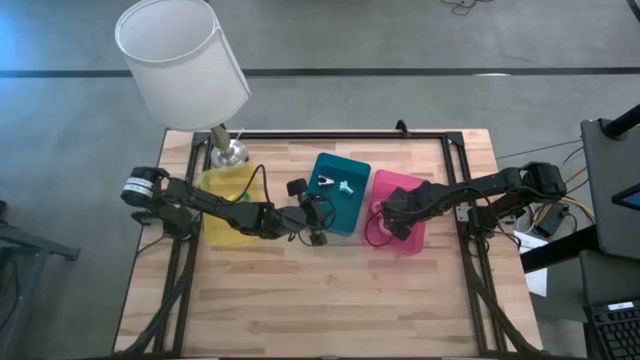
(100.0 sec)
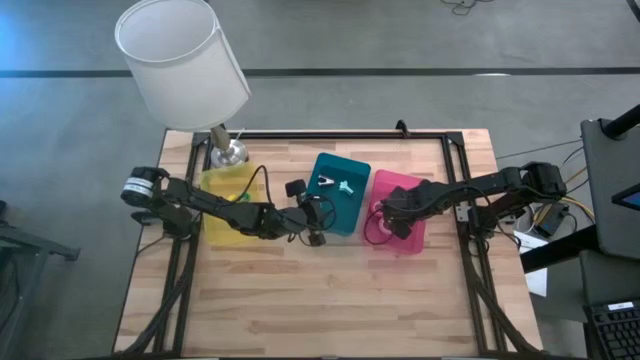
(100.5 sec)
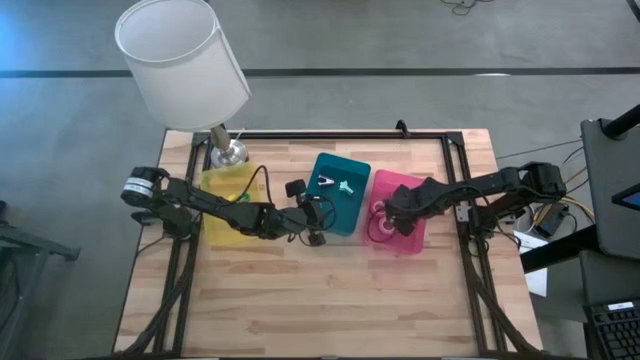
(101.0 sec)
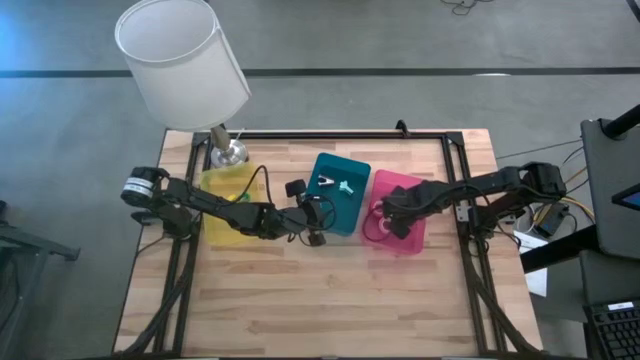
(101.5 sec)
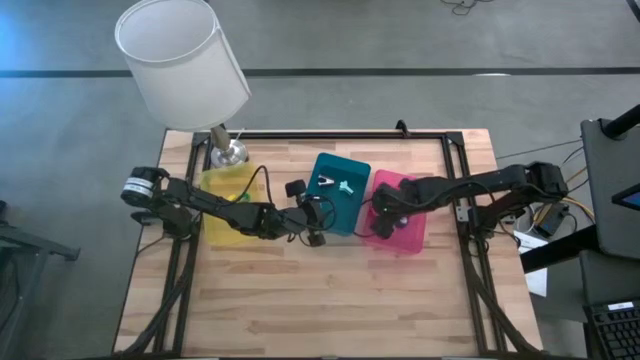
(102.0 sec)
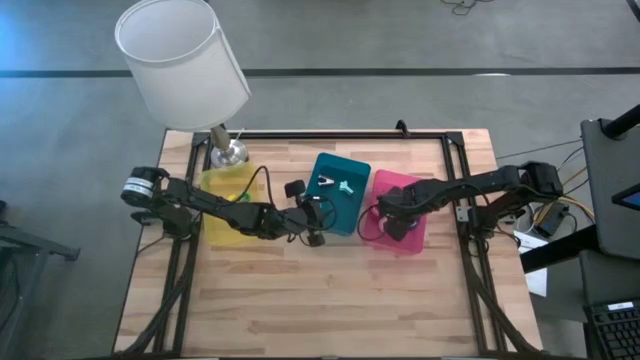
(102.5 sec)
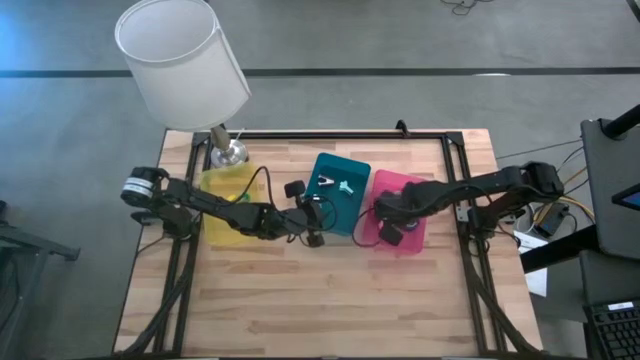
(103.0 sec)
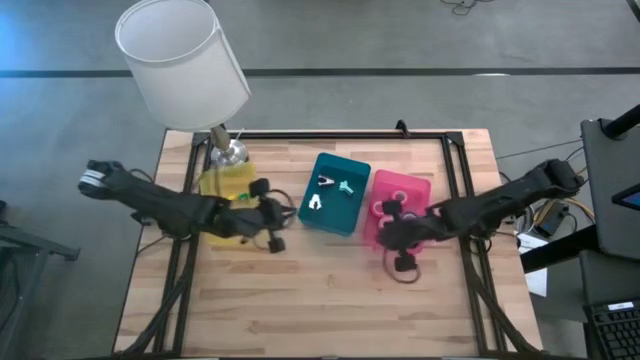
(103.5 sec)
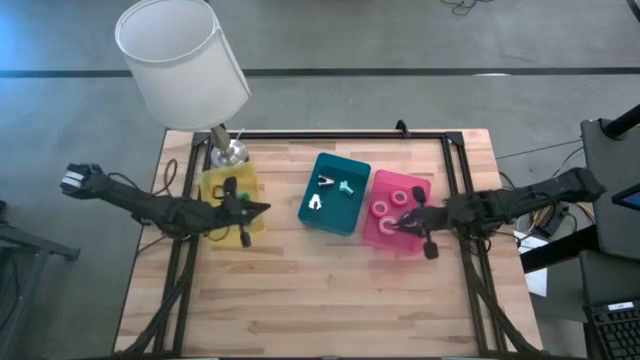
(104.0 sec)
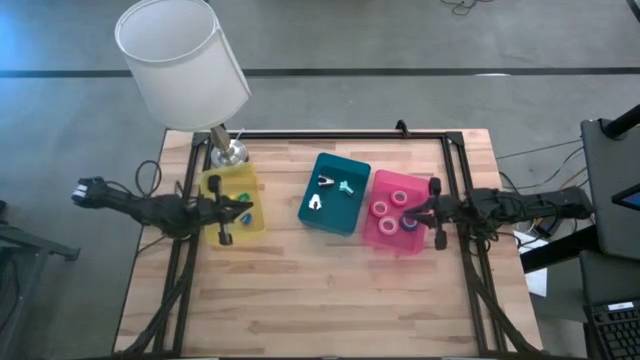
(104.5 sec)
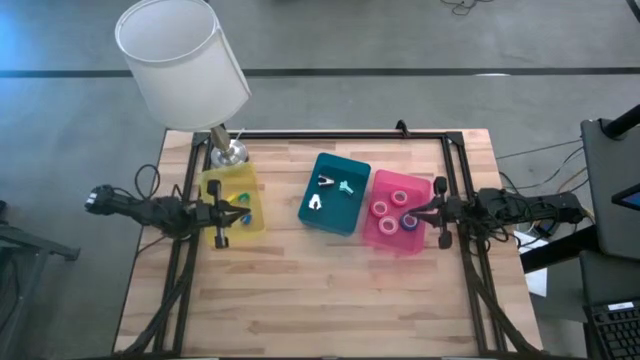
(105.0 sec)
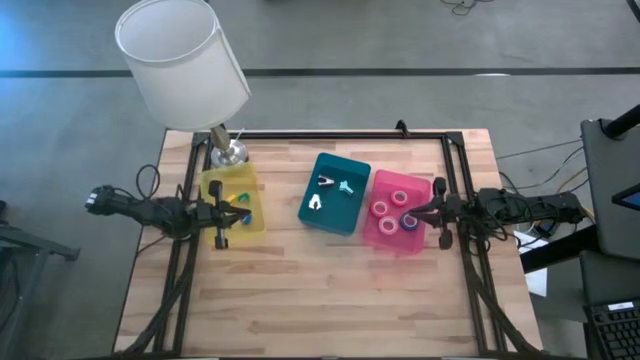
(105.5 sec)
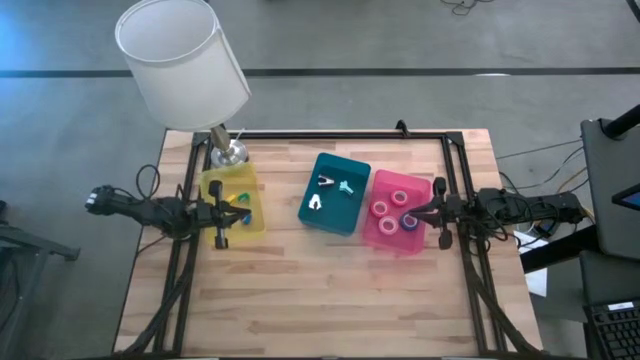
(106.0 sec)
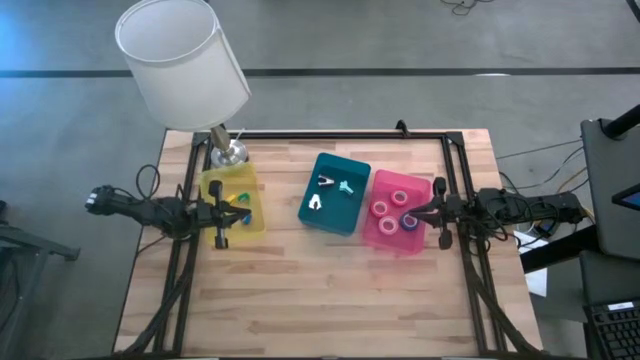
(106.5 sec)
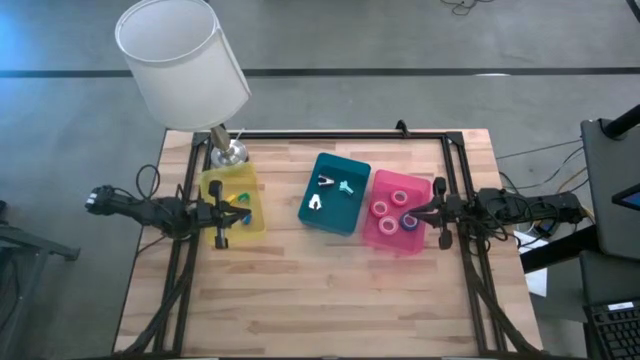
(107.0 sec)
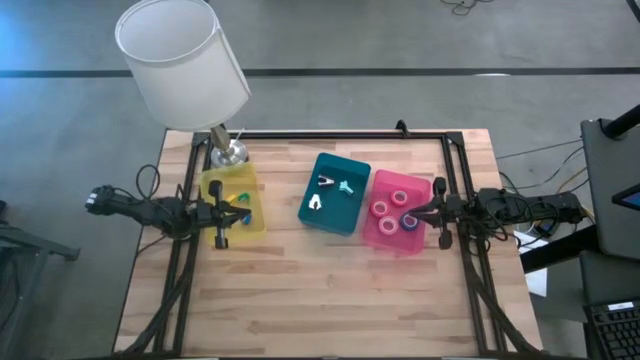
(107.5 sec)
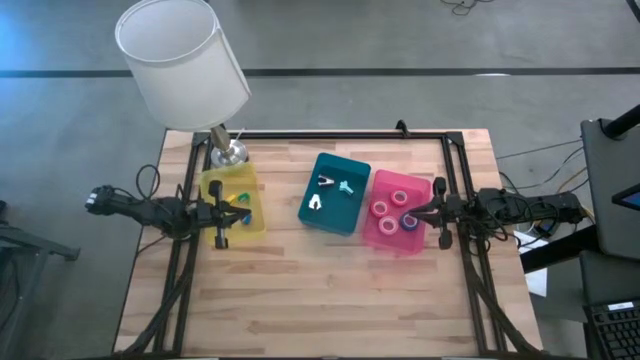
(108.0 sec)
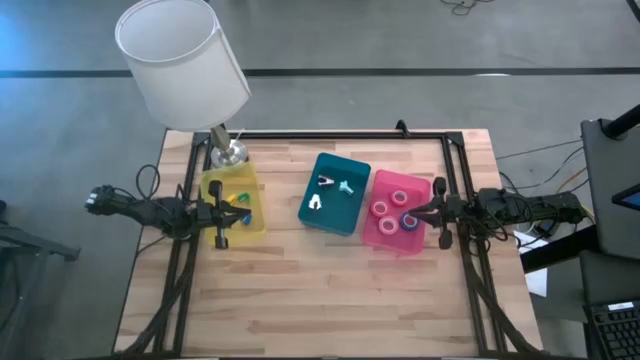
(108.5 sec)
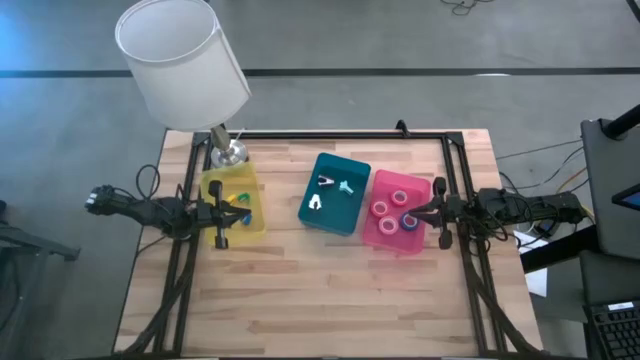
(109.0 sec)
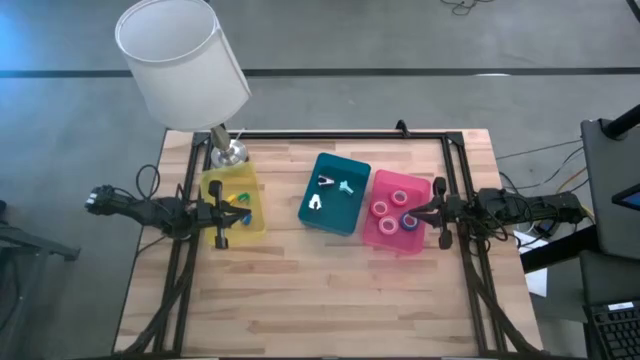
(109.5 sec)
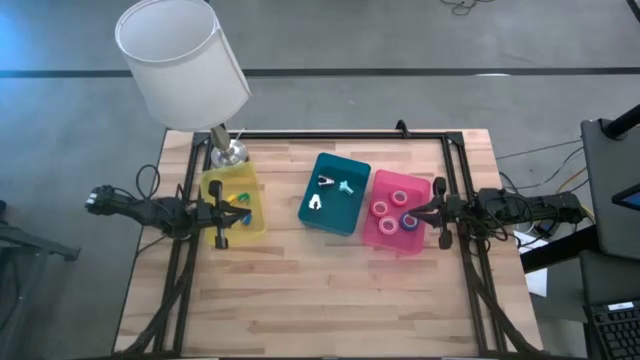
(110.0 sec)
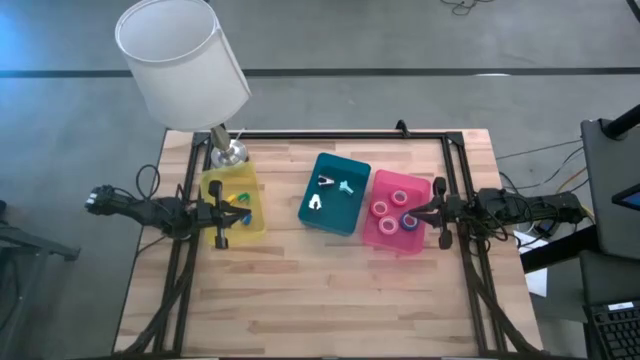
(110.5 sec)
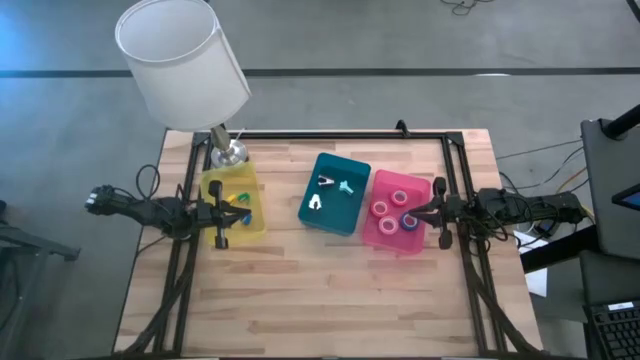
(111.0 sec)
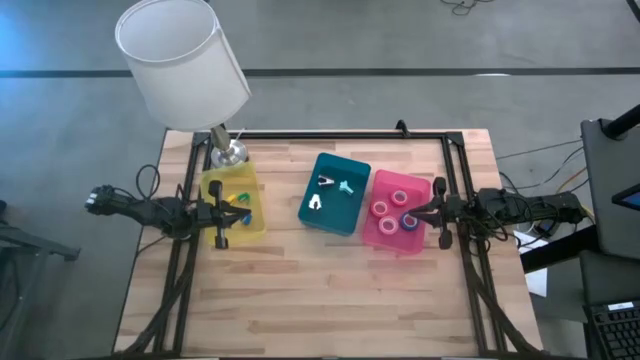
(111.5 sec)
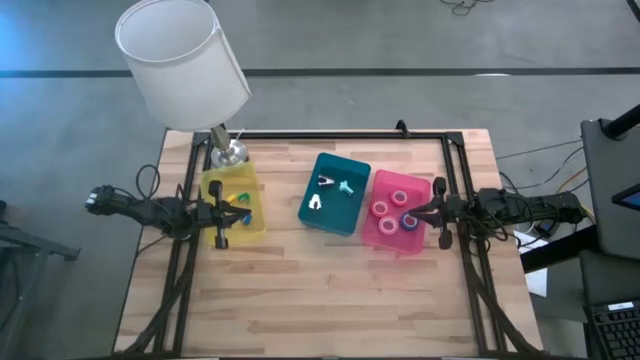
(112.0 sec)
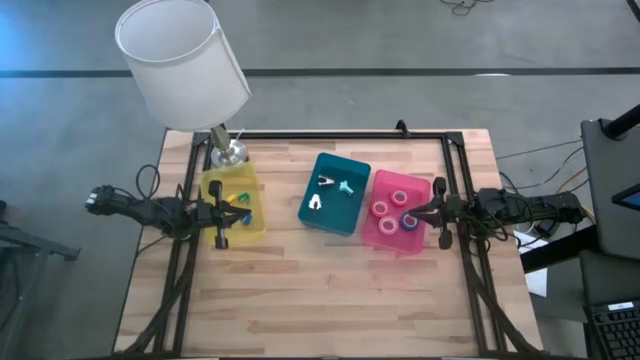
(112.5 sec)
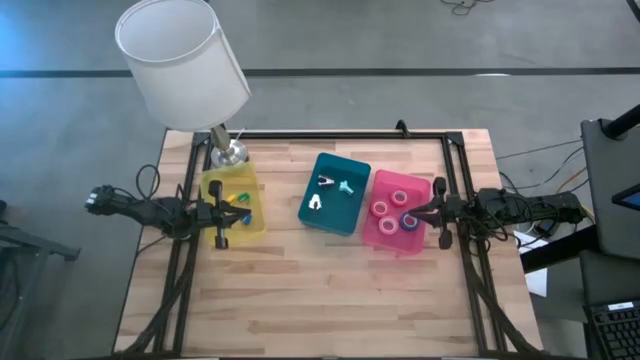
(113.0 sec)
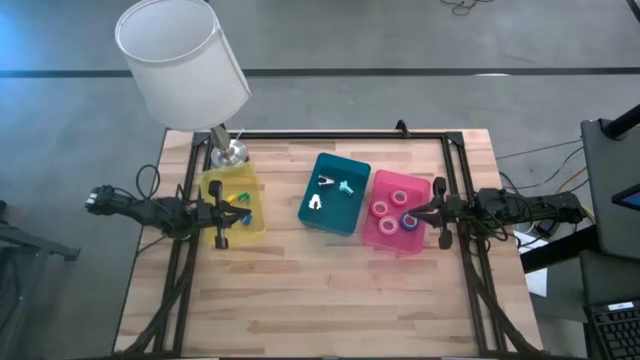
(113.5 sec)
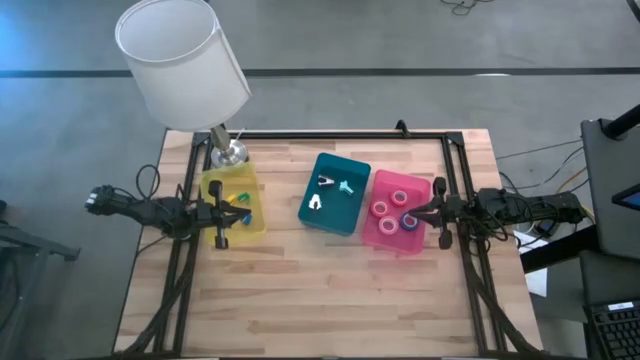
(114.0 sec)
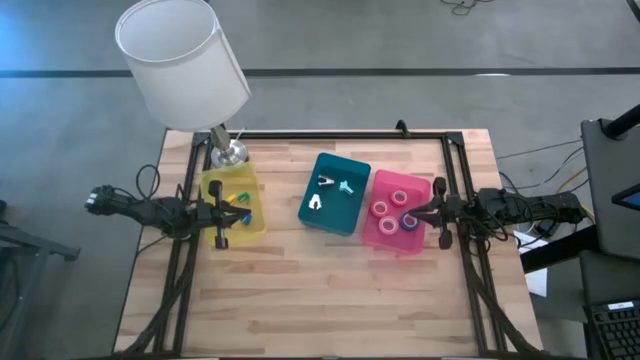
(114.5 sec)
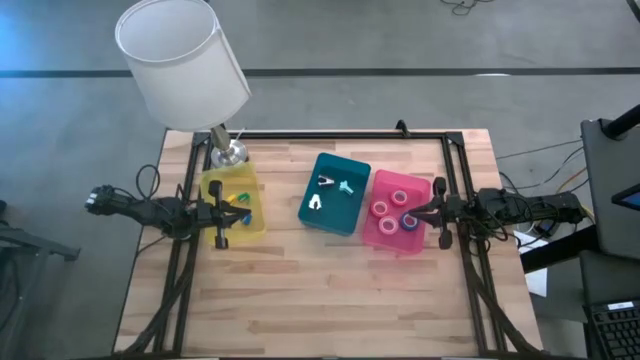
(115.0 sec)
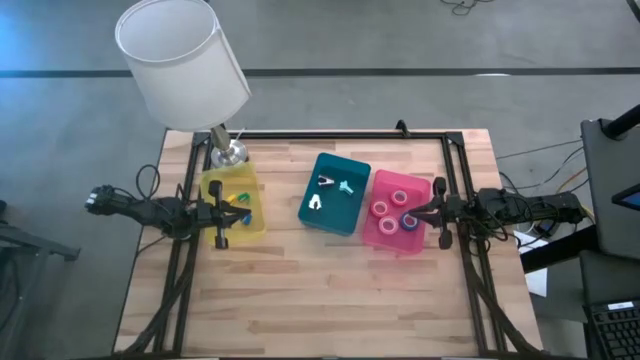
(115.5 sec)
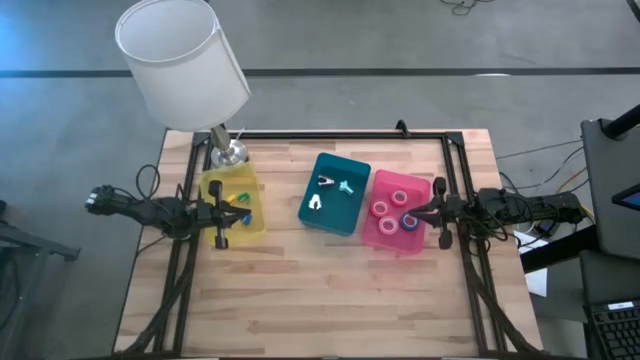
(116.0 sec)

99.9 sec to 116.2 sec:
Task: Pick and place Stapler, Stapler remover, tape
Return to Home Position

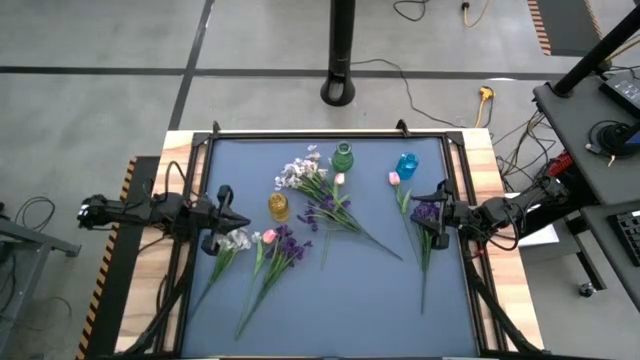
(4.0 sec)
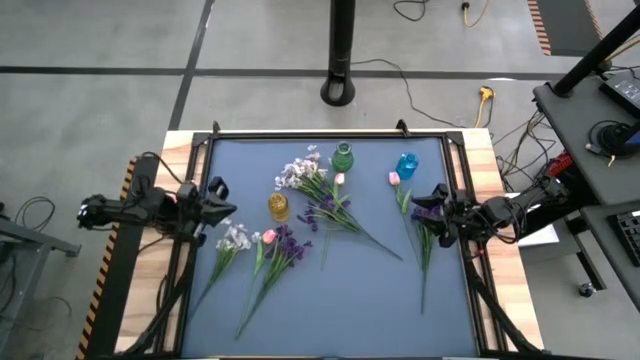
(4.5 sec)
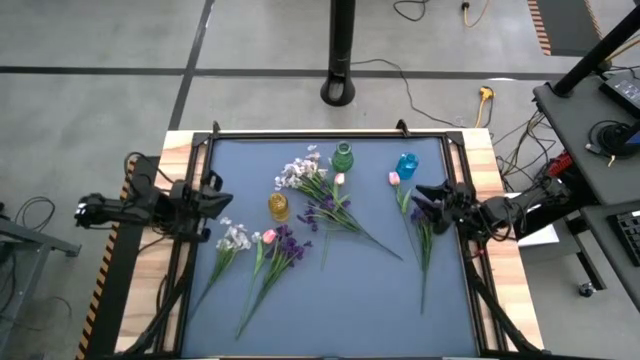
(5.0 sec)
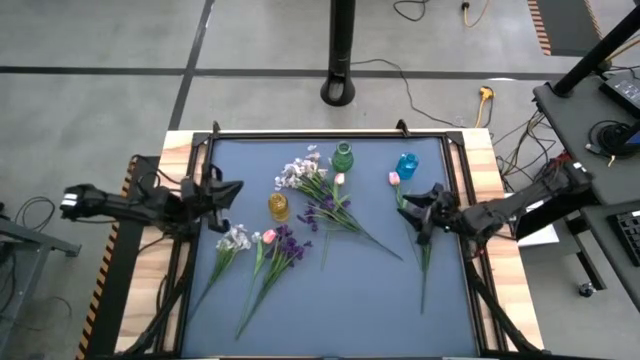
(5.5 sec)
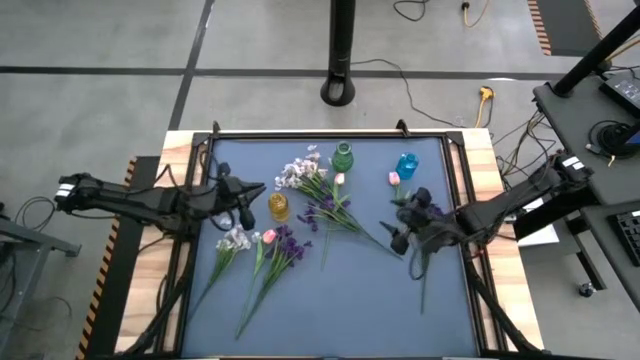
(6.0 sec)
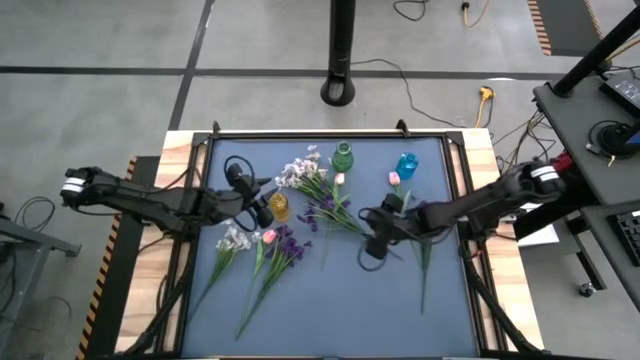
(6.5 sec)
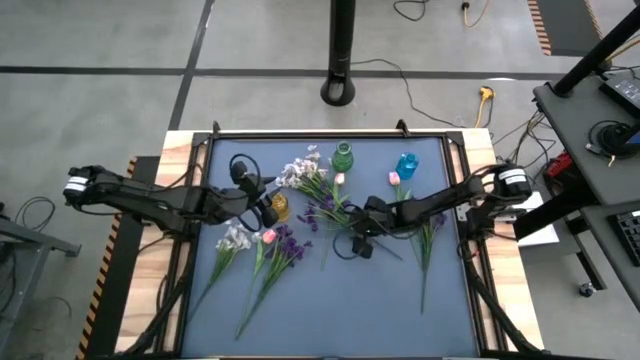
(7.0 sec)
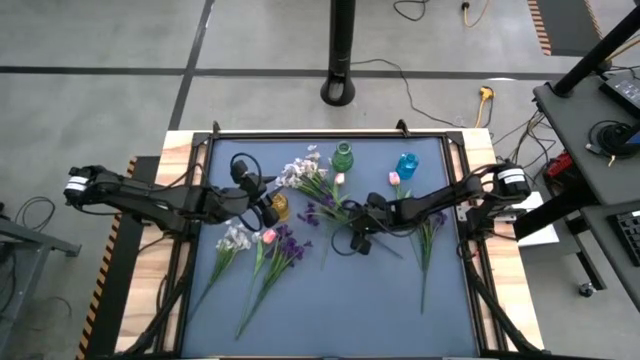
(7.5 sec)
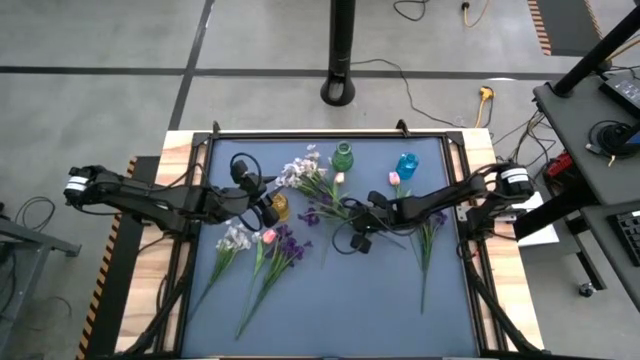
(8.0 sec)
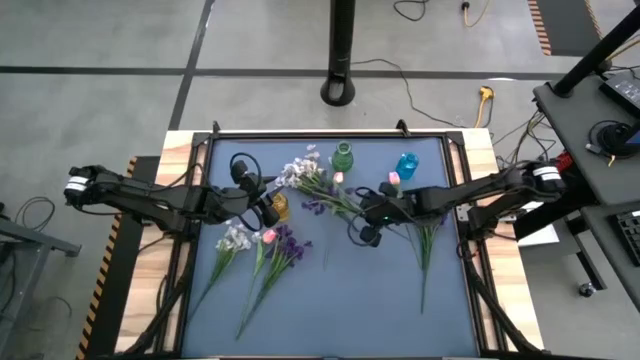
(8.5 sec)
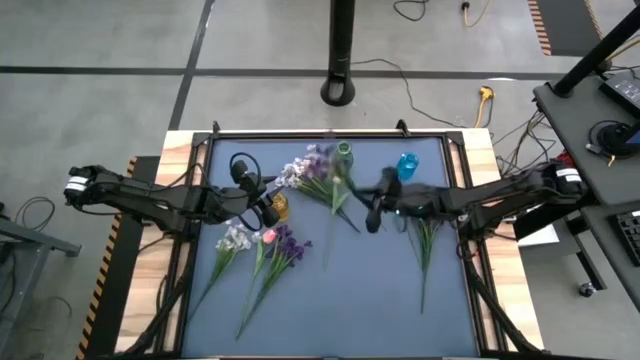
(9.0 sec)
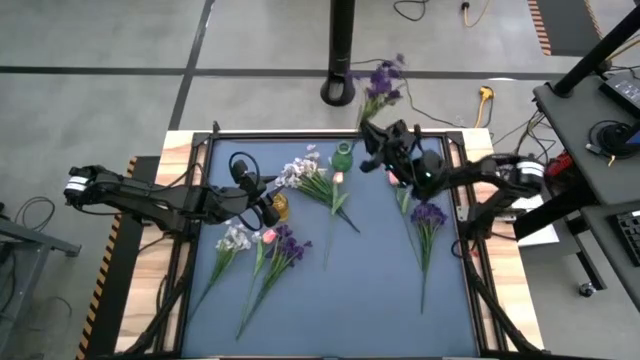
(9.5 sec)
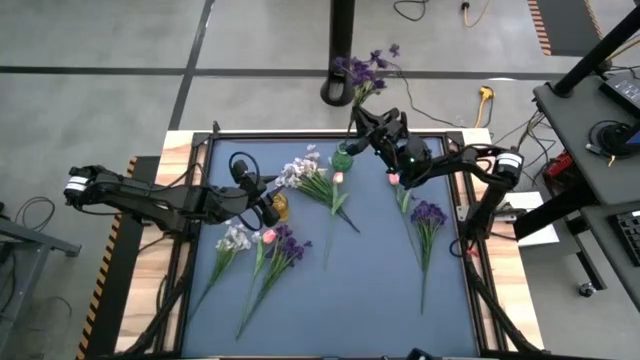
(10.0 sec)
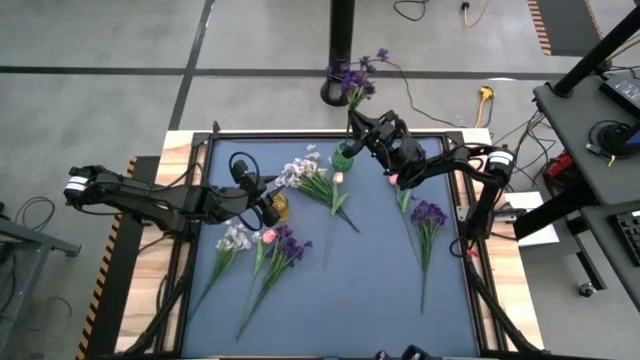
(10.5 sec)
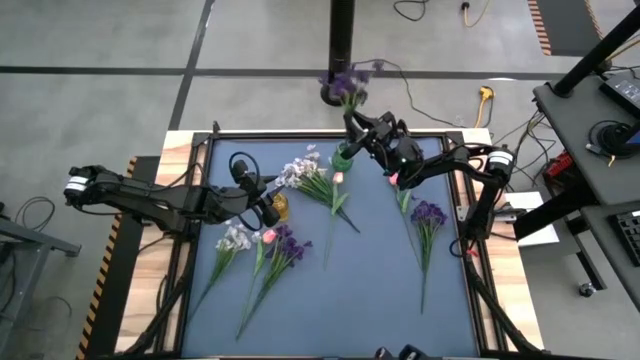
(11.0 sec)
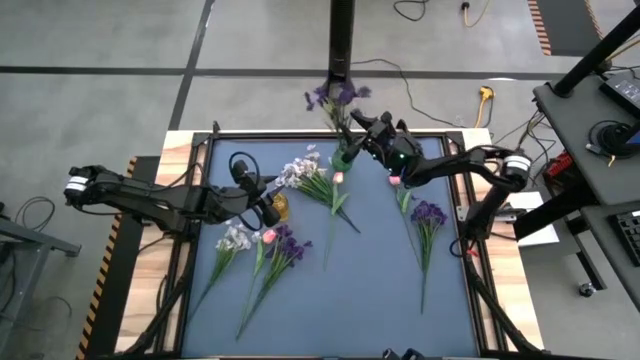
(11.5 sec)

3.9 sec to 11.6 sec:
Task: Sort flowers into vase by color
Put the middle purple flowers into the green vase
